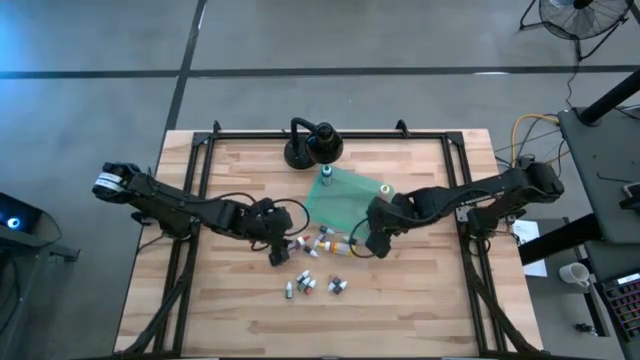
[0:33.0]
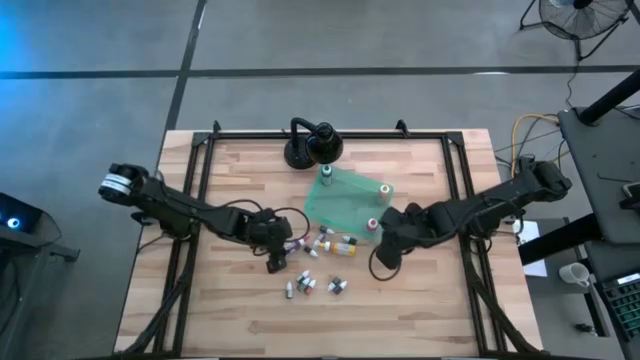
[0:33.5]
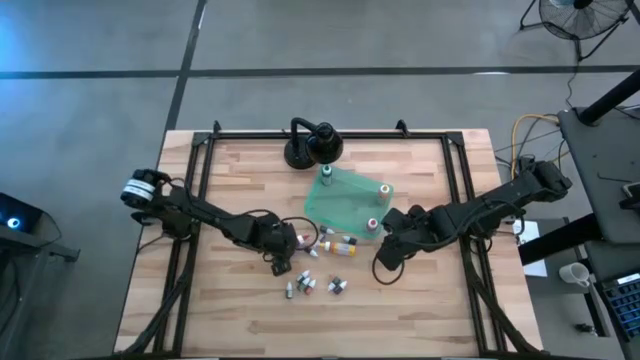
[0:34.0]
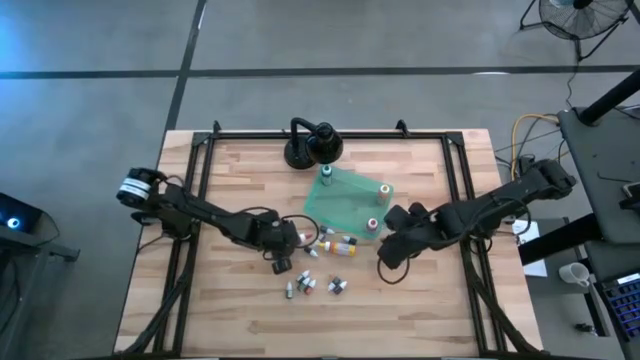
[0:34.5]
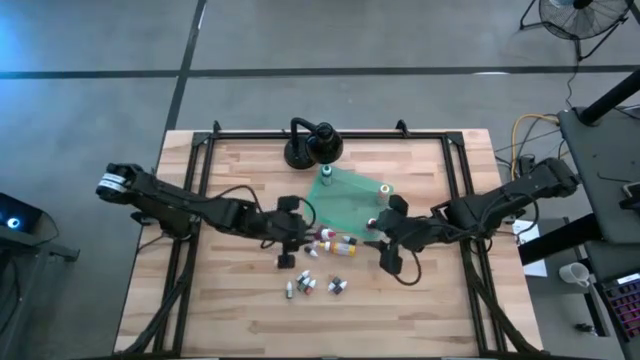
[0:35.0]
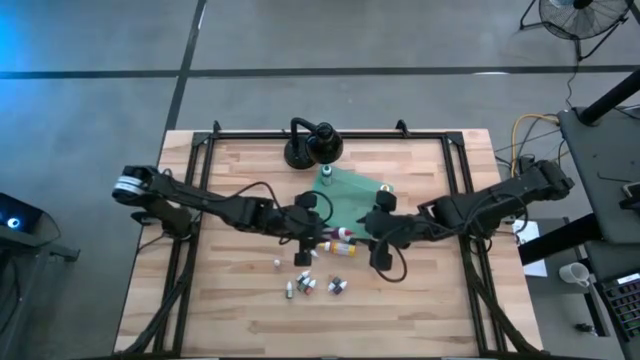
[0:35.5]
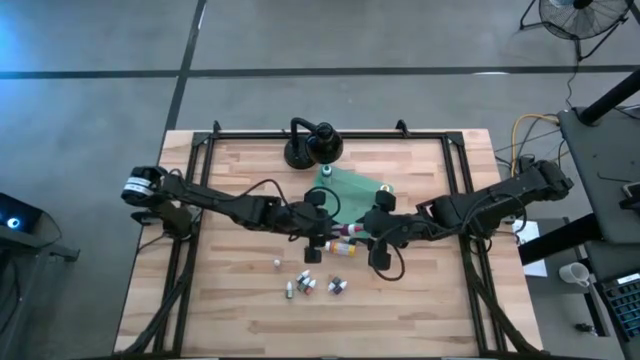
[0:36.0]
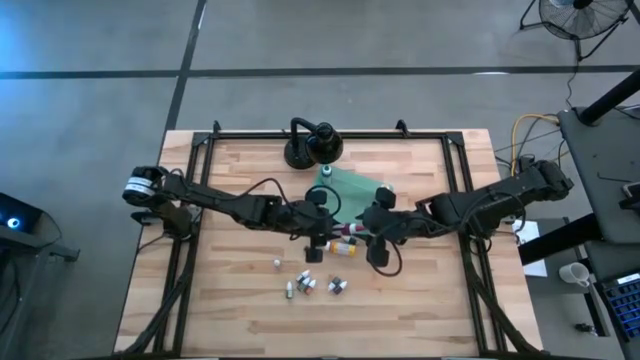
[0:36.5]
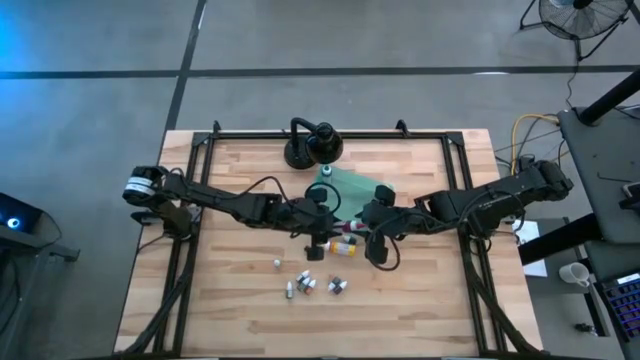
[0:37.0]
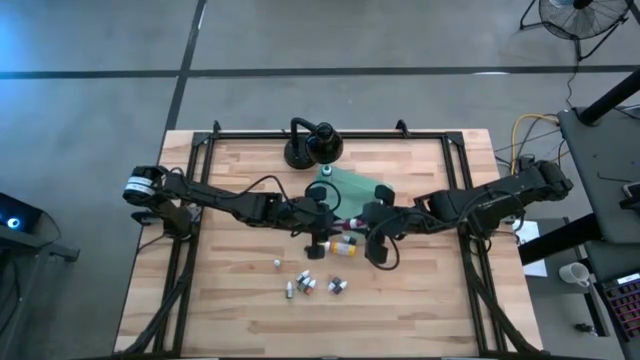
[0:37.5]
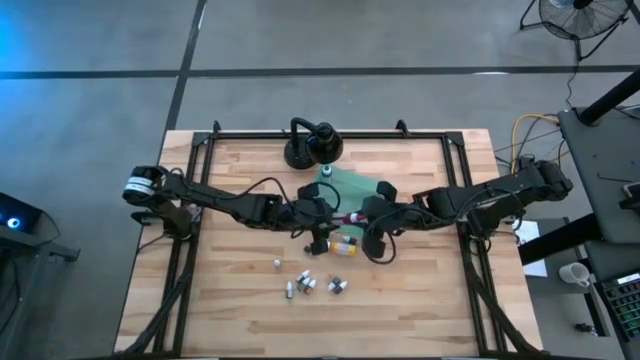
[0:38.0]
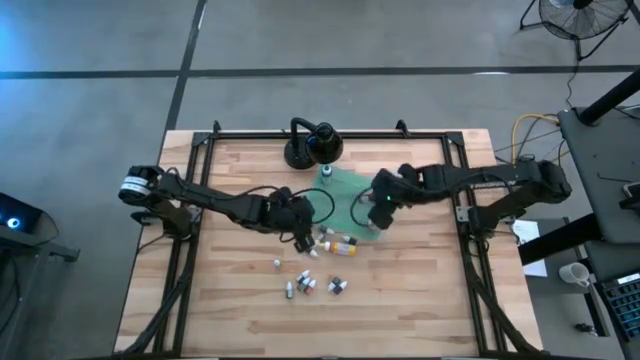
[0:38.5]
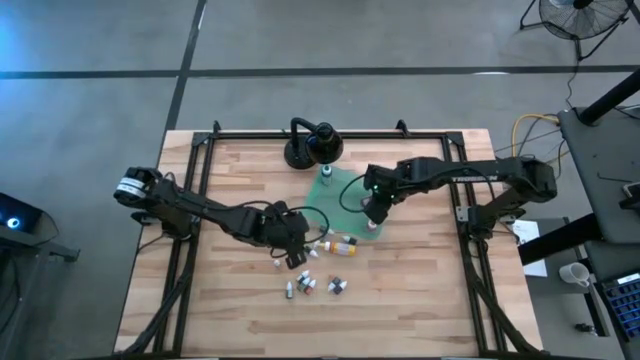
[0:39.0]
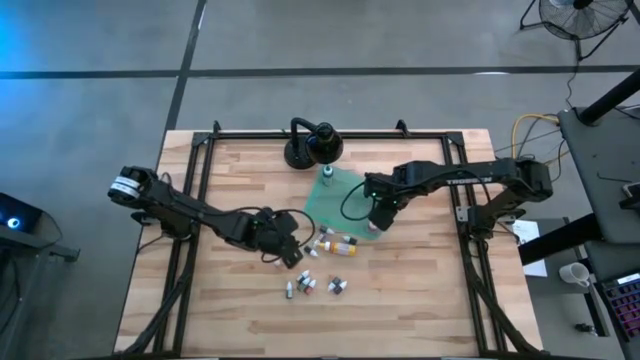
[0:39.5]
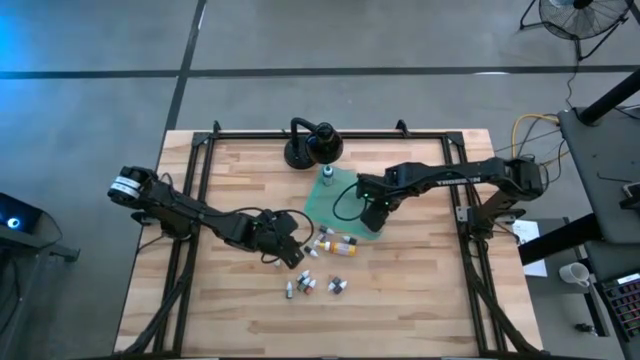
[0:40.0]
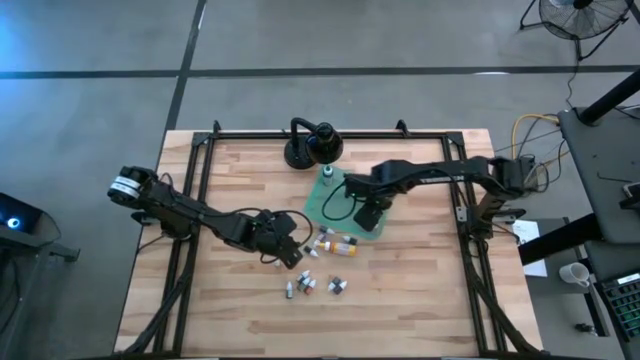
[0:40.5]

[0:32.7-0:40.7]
Task: Pick & Place food coloring
Put the large red food coloring bottle into the bin

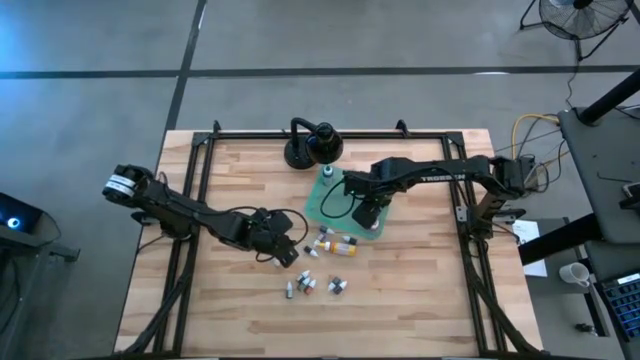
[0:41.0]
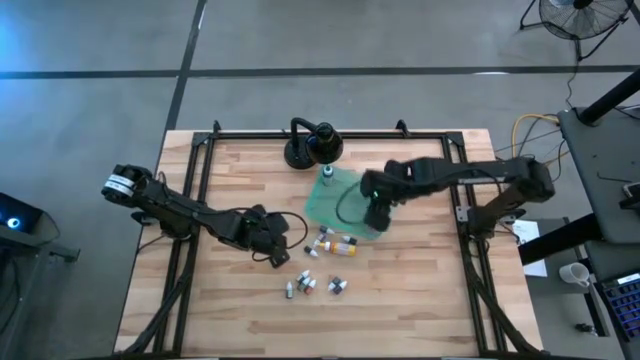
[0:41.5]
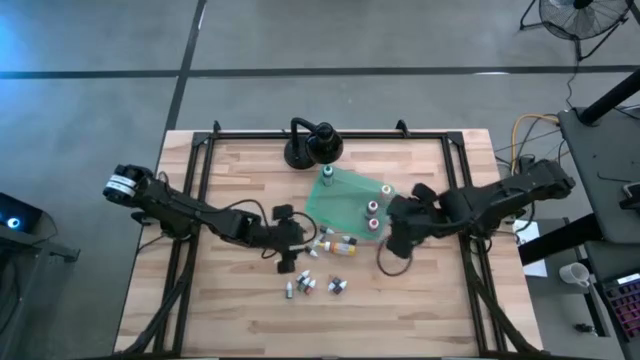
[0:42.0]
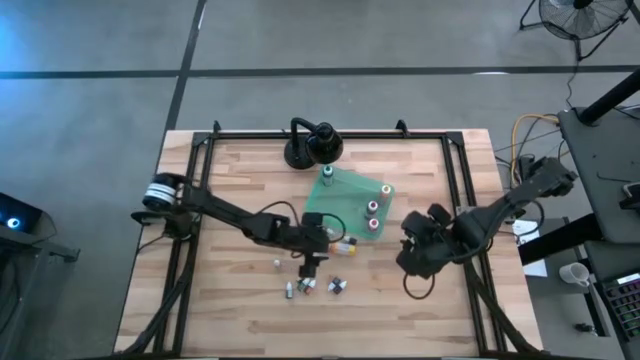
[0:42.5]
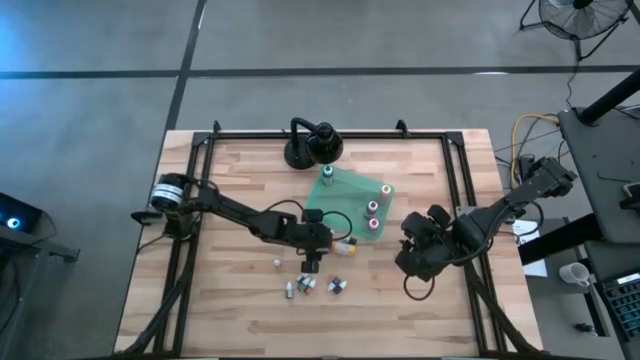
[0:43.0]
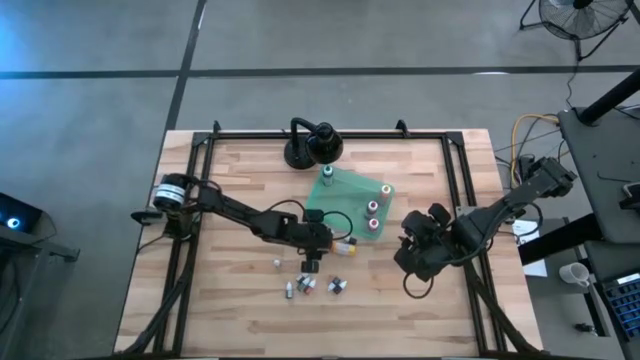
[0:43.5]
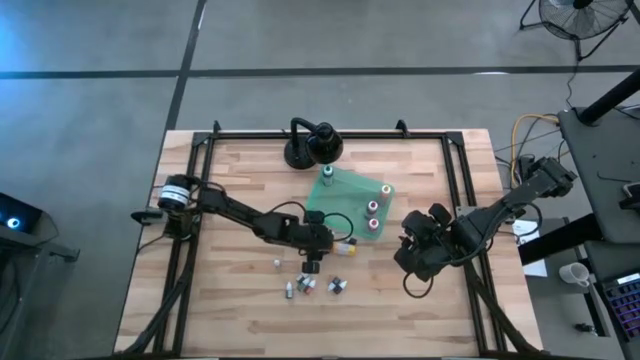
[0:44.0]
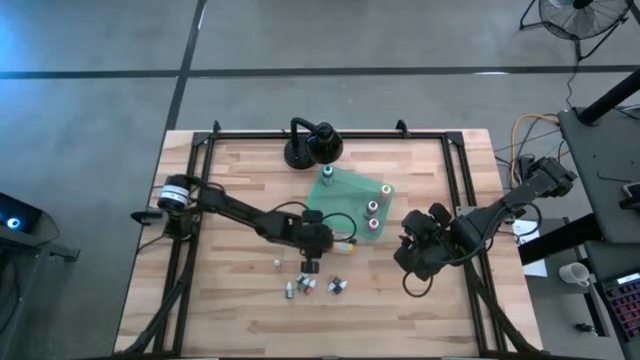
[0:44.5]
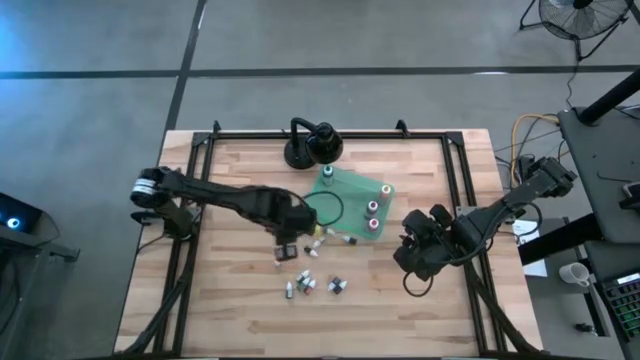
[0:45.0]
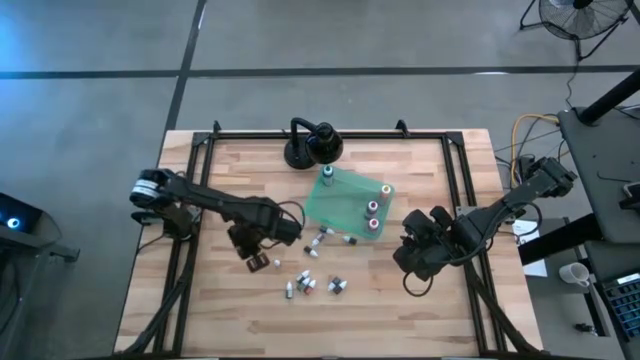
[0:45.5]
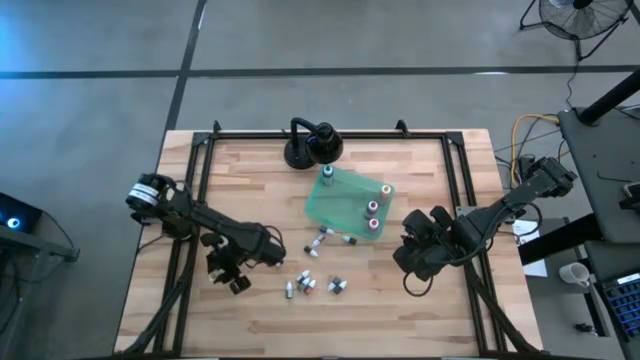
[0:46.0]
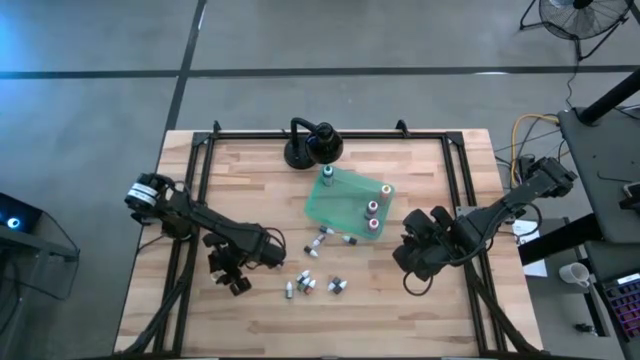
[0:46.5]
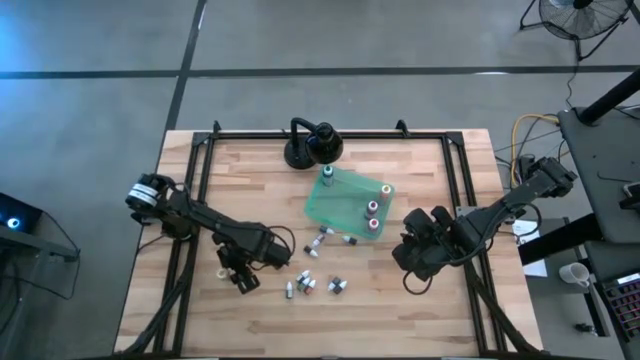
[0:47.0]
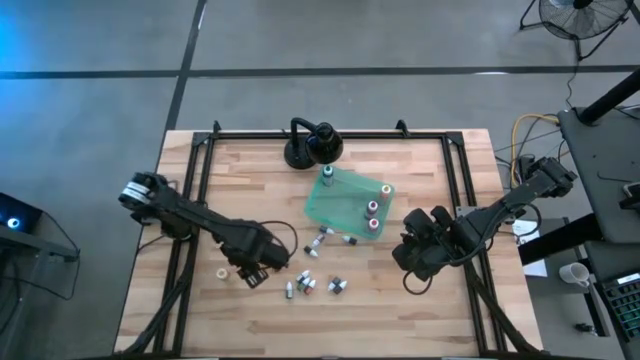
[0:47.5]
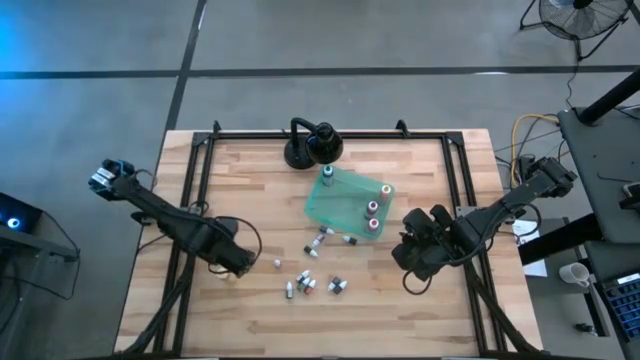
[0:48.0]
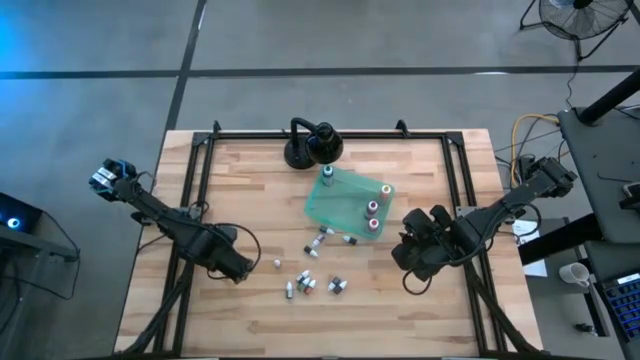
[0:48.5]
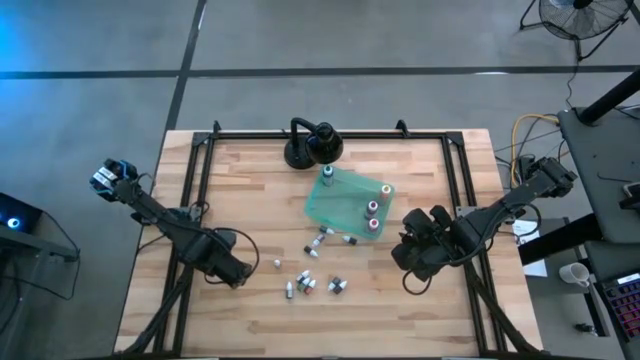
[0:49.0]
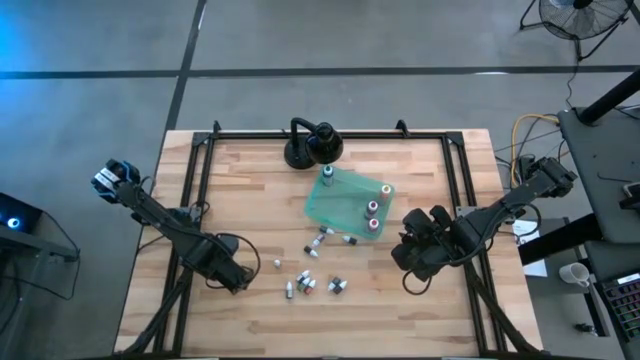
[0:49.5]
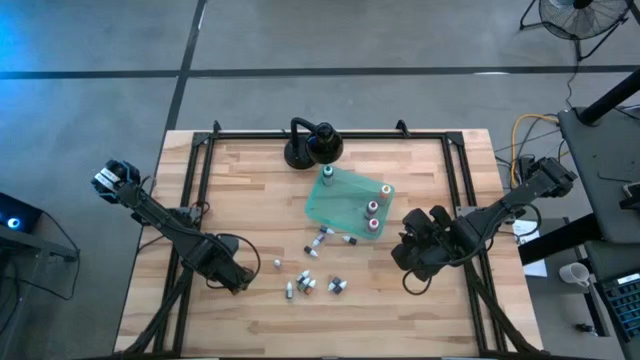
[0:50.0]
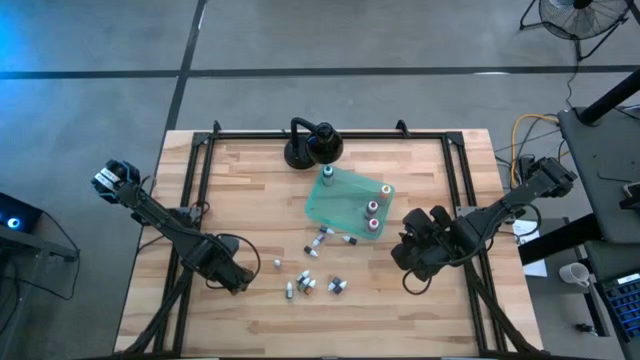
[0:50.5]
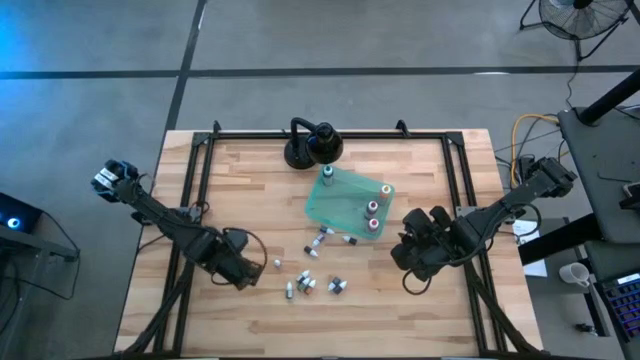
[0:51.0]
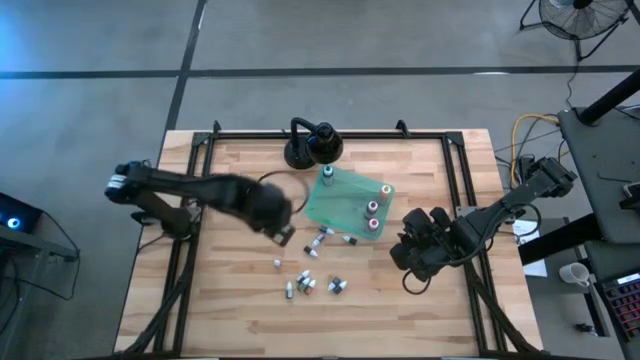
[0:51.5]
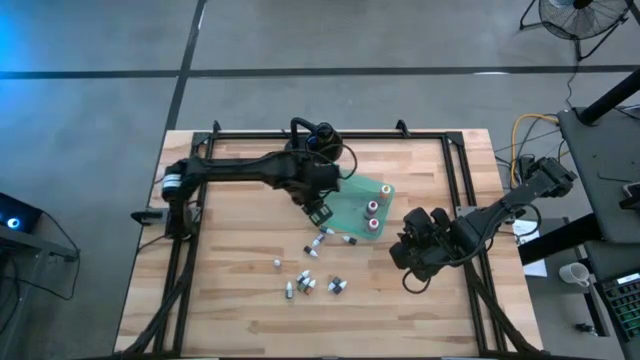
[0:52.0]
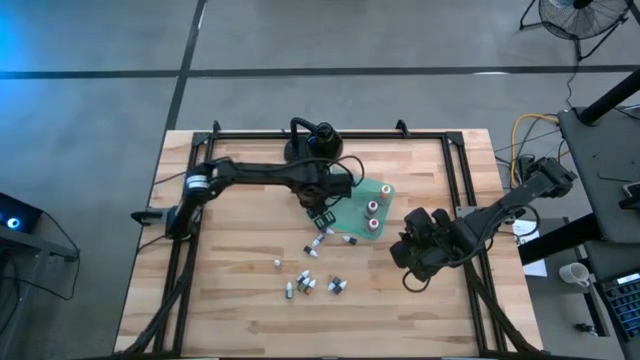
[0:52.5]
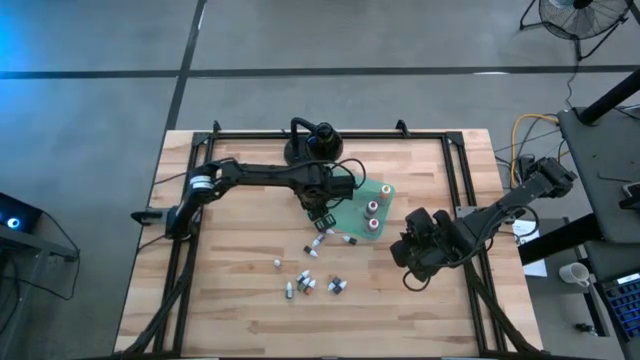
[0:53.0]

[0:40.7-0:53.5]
Put the large yellow food coloring bottle into the bin
